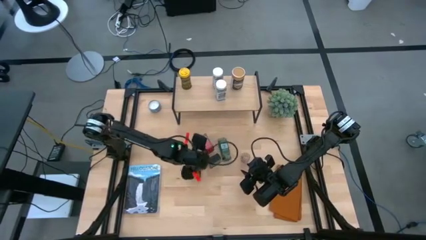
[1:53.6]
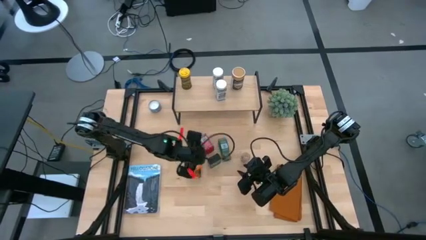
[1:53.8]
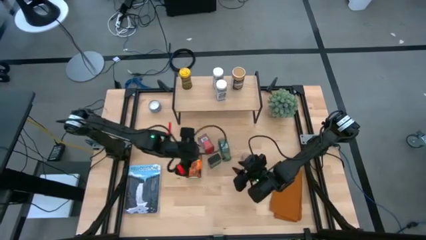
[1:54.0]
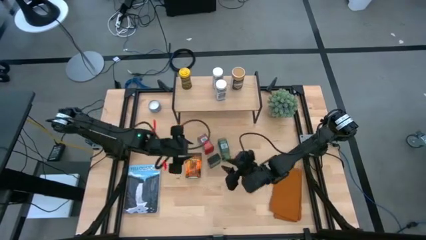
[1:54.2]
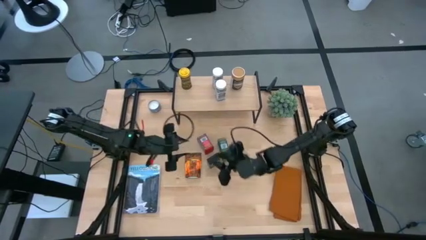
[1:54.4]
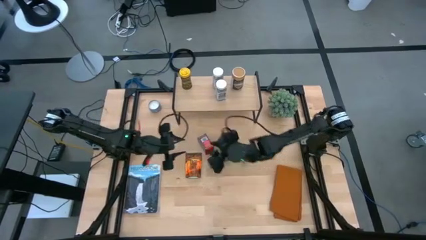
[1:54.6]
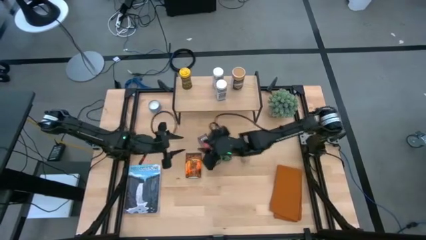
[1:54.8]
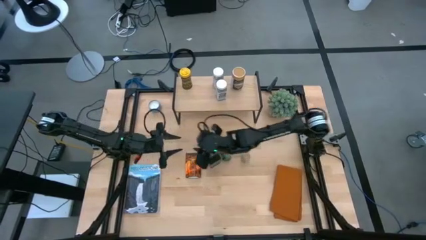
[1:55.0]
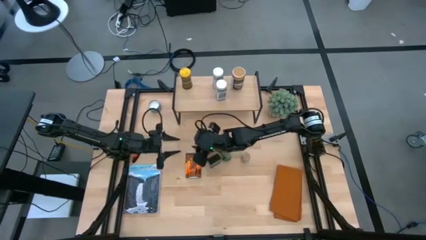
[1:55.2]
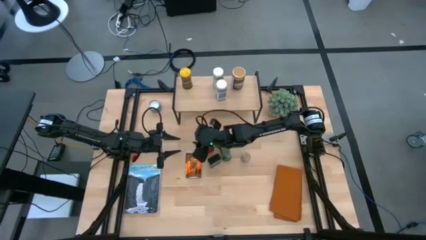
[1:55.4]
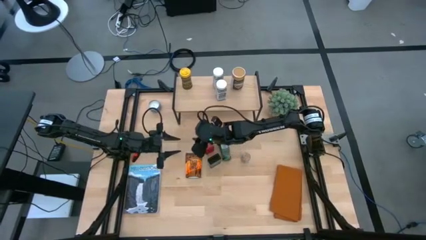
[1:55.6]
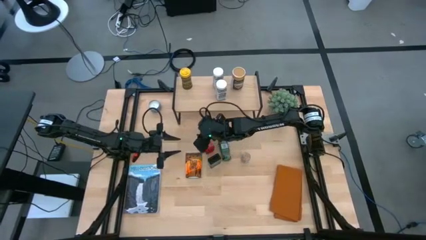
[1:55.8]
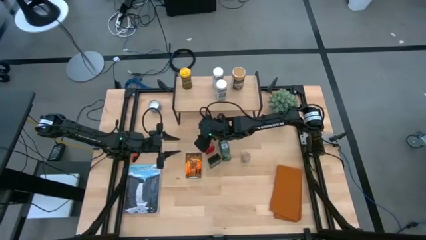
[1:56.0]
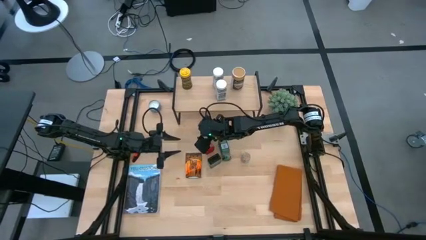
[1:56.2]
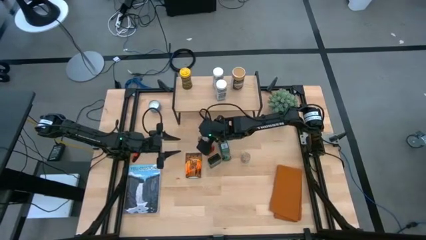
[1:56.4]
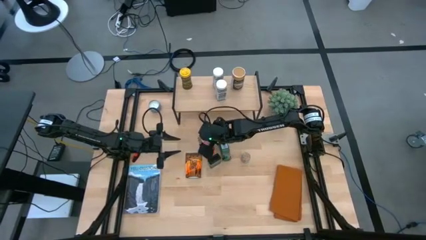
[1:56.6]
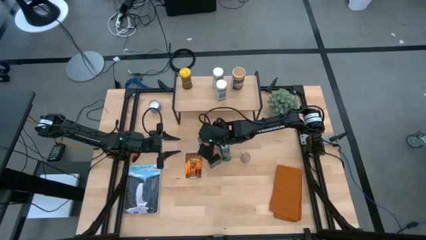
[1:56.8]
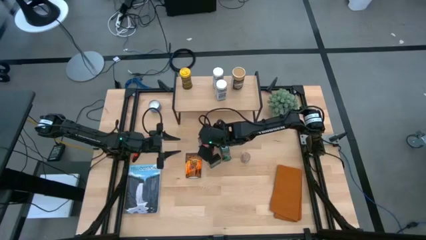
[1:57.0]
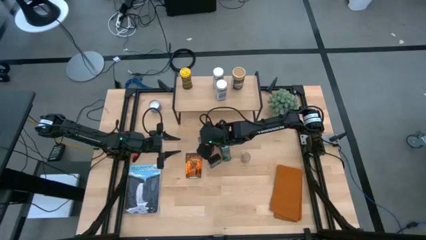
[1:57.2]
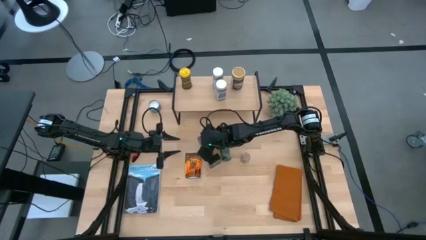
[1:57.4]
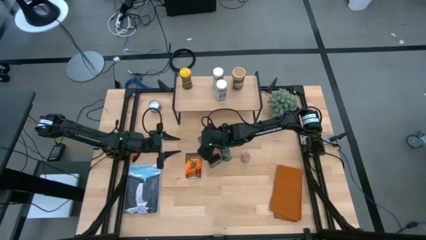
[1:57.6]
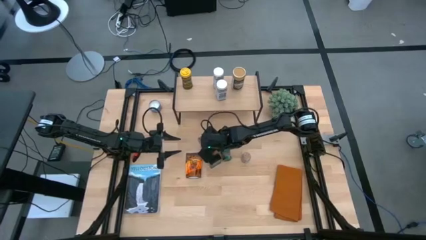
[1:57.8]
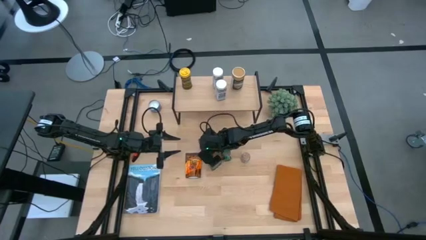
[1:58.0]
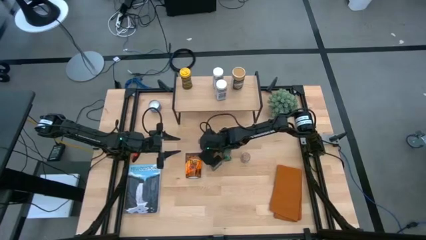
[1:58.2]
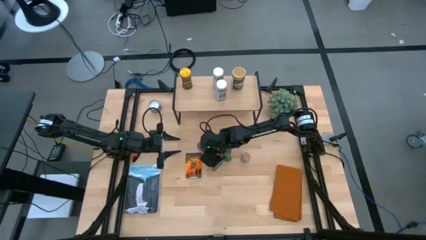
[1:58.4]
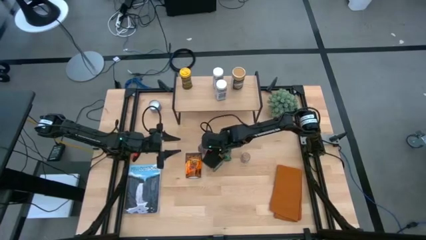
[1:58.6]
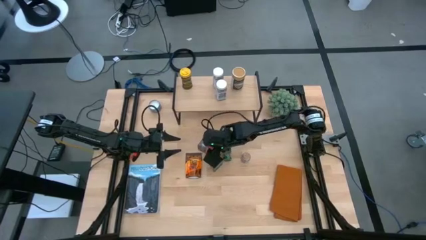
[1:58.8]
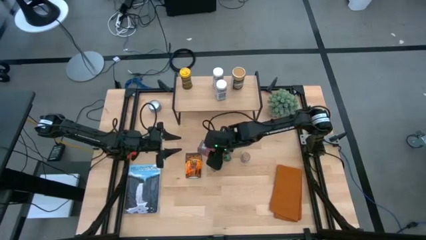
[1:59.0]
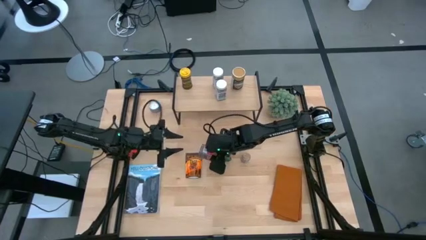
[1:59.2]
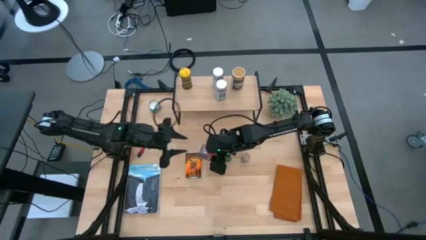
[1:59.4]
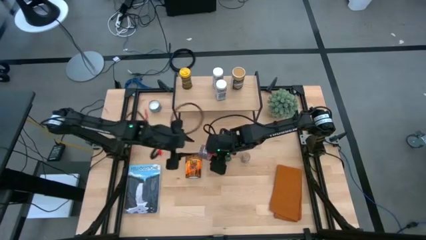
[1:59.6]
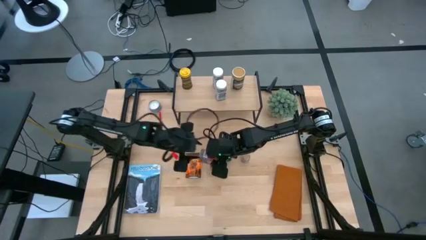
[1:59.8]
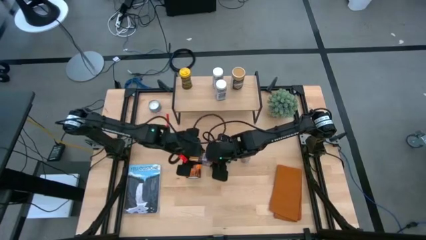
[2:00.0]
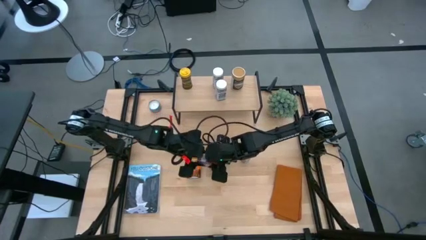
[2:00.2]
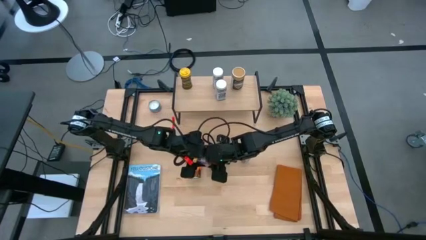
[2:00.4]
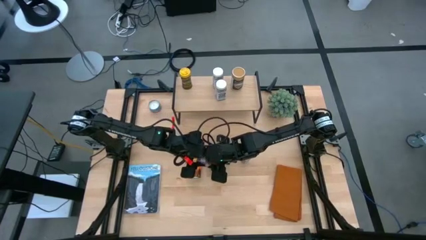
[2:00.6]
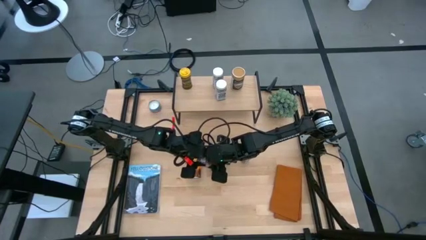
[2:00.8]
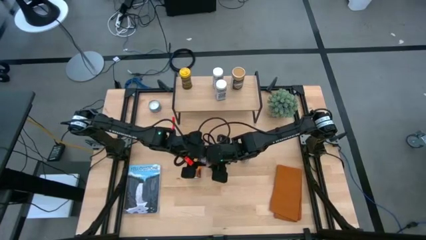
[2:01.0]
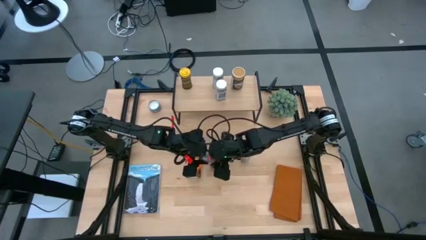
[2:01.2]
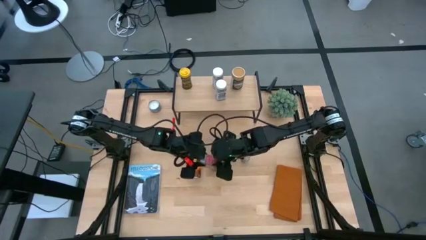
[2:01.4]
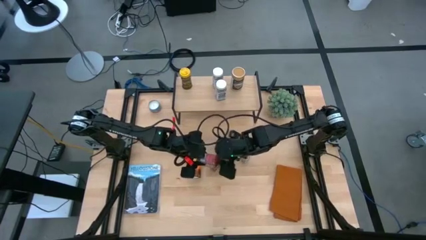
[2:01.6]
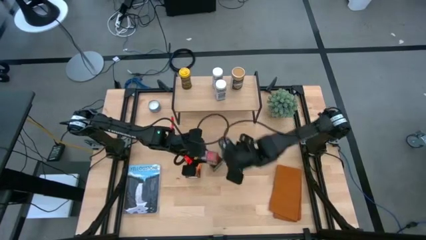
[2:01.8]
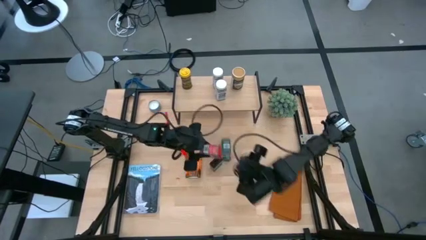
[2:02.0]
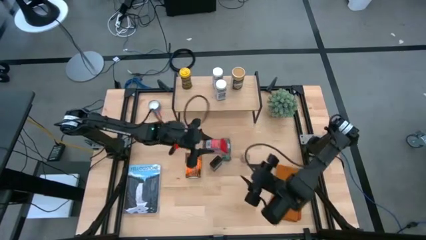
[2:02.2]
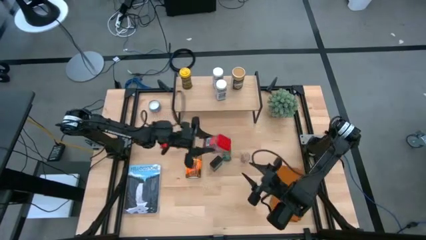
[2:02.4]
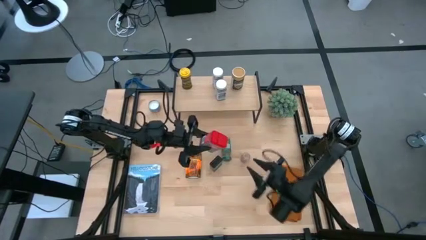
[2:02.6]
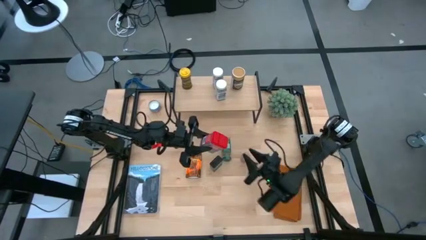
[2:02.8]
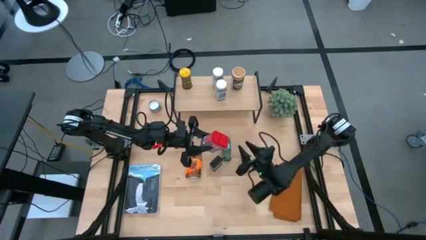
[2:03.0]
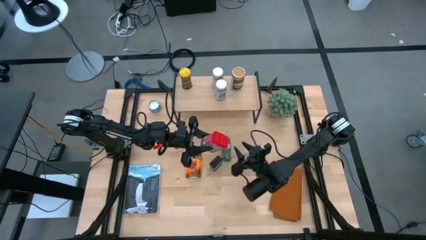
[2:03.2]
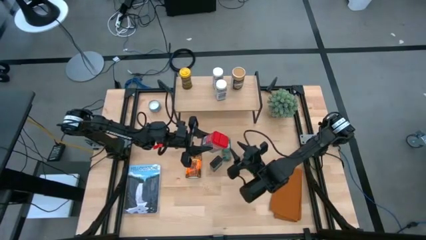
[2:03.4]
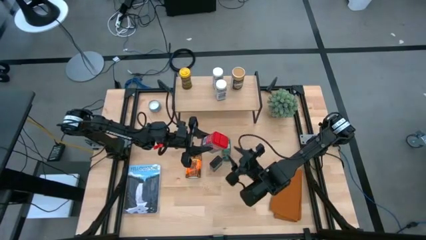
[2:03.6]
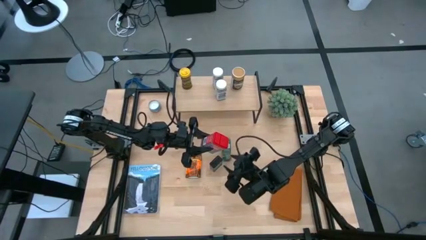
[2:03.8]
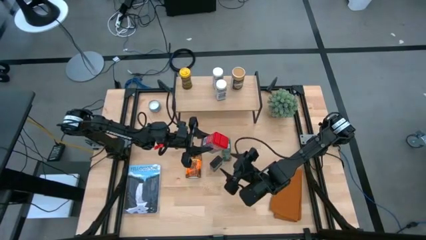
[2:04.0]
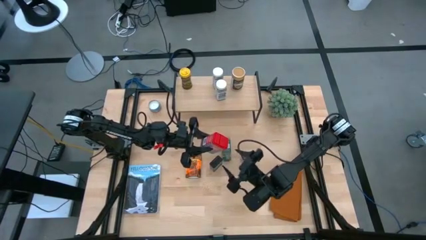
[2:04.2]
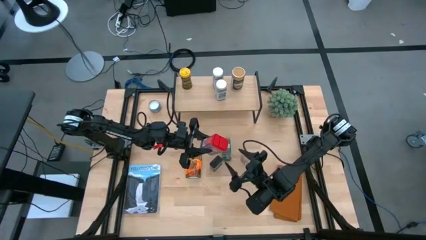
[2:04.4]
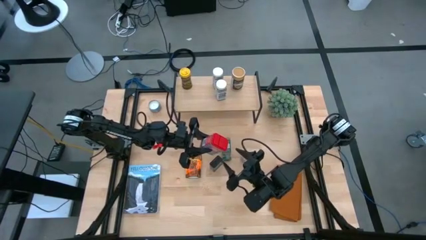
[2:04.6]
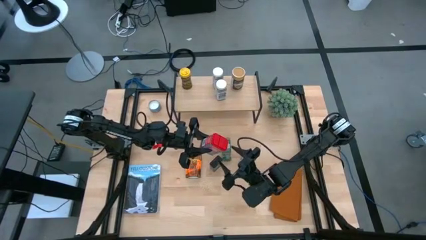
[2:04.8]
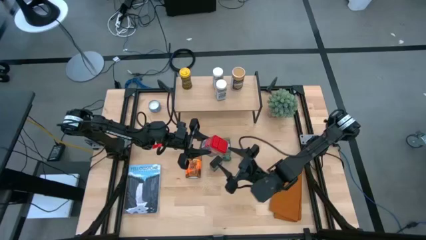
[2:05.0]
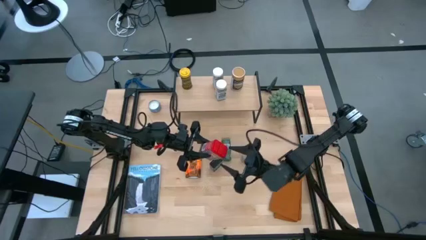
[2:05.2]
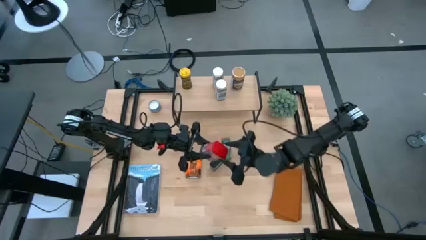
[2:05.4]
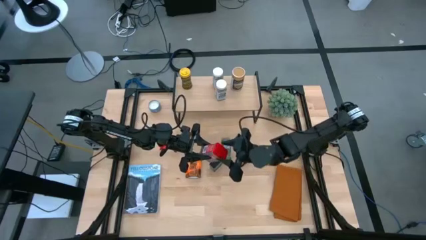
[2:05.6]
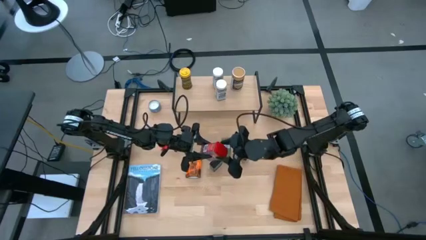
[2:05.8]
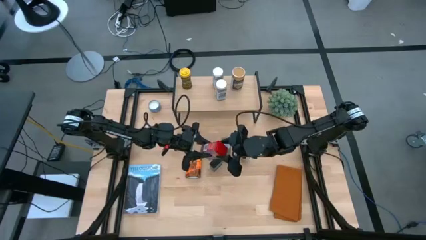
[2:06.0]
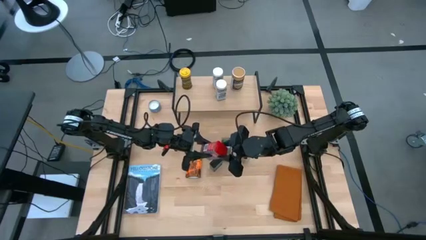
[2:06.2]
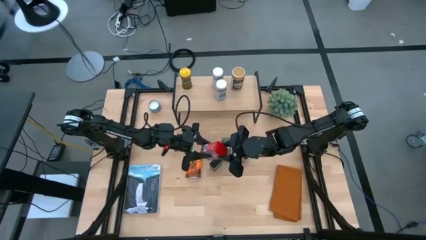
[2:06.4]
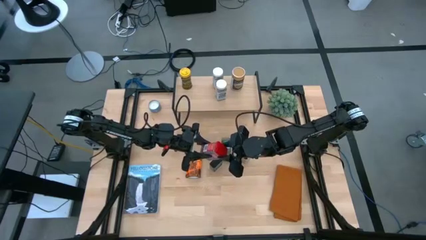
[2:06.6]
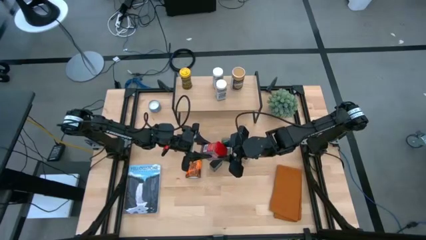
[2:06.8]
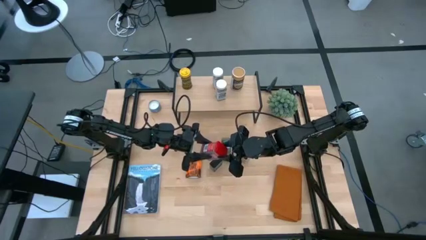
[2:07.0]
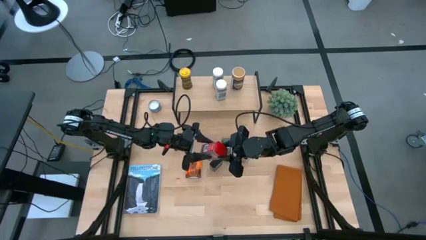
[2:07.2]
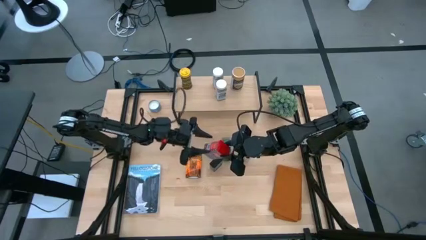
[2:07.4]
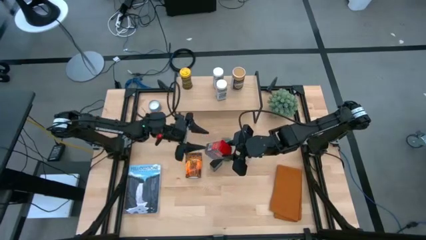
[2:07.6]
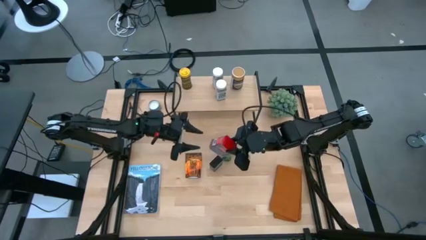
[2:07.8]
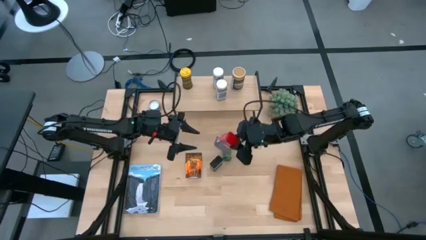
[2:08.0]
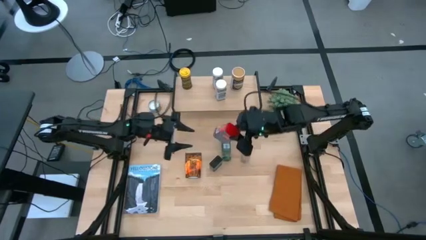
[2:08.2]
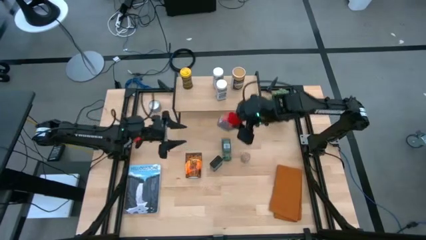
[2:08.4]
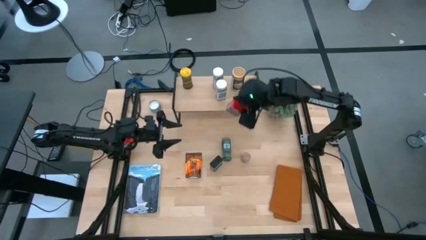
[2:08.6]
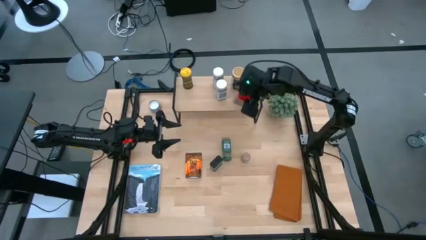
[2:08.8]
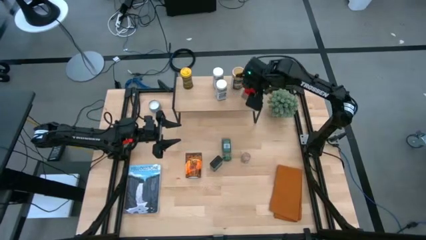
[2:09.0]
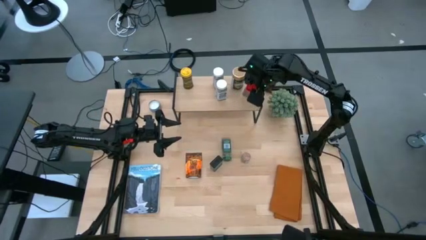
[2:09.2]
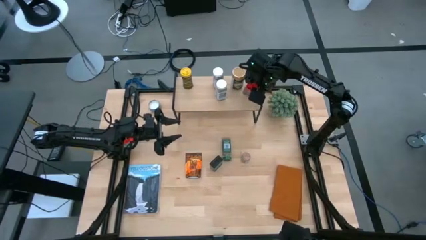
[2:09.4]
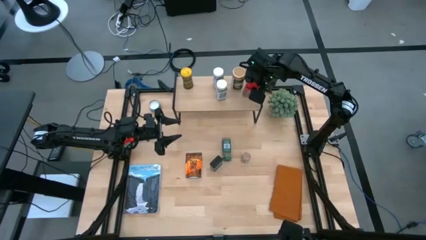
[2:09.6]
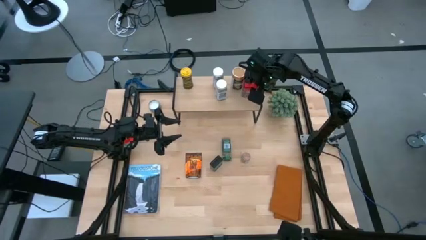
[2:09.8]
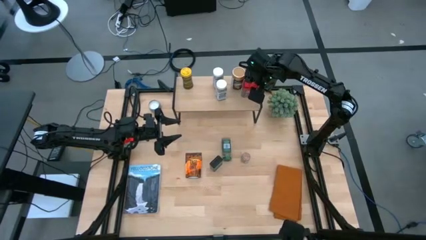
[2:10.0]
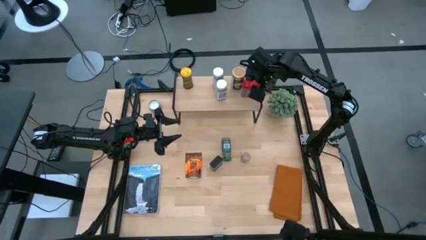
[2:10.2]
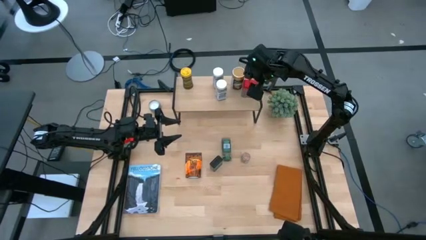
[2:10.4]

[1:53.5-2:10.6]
Task: Shelf spices
Put the red can seasoning on the shelf
